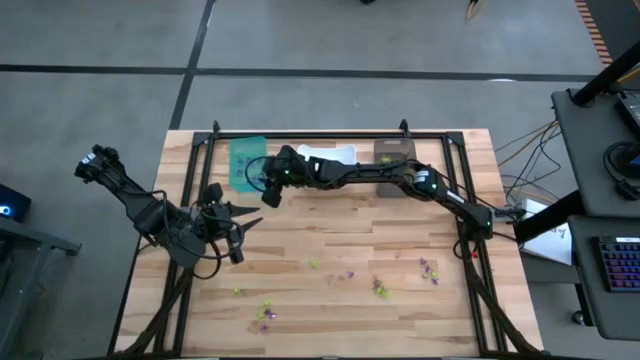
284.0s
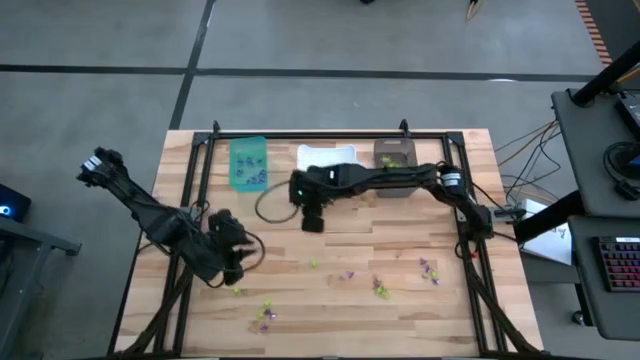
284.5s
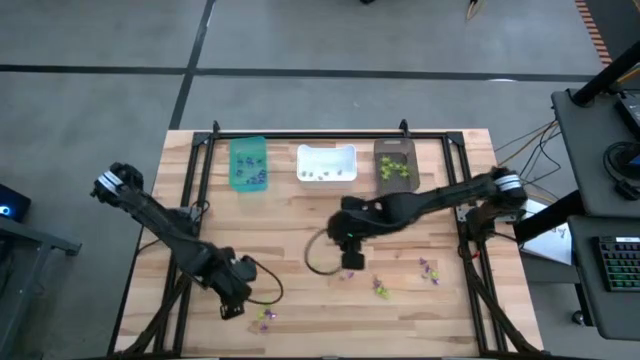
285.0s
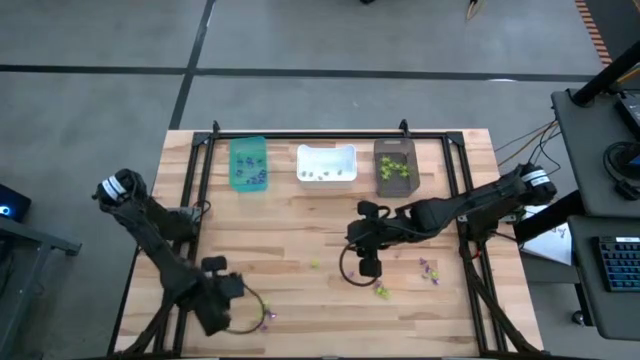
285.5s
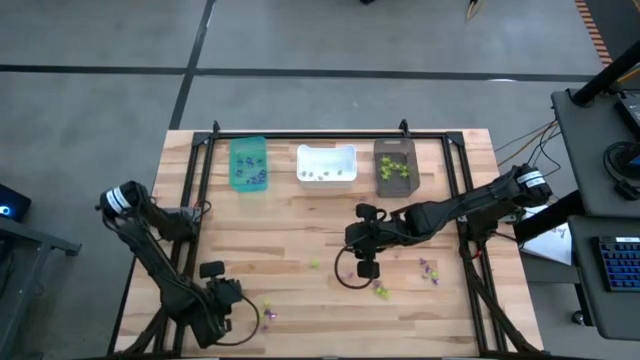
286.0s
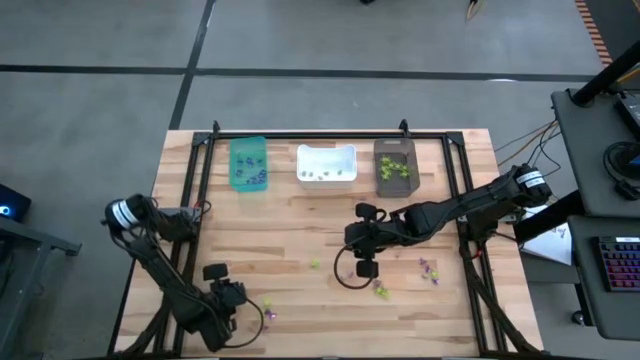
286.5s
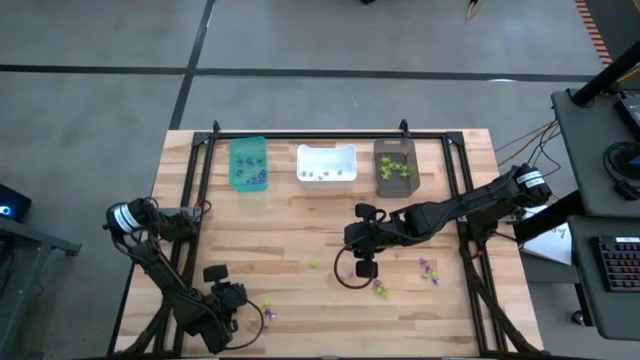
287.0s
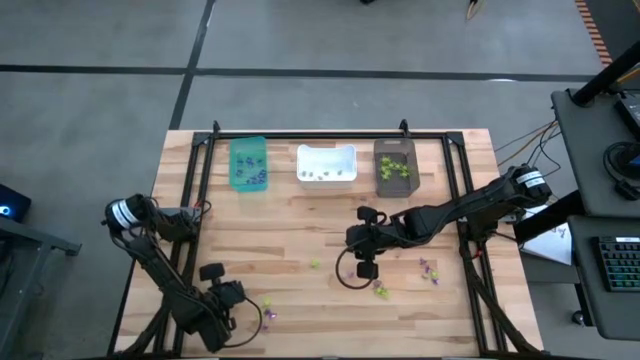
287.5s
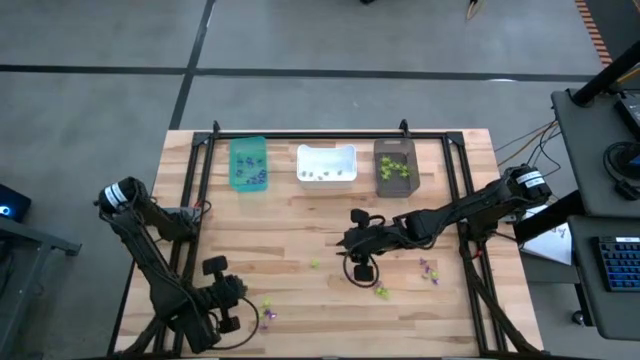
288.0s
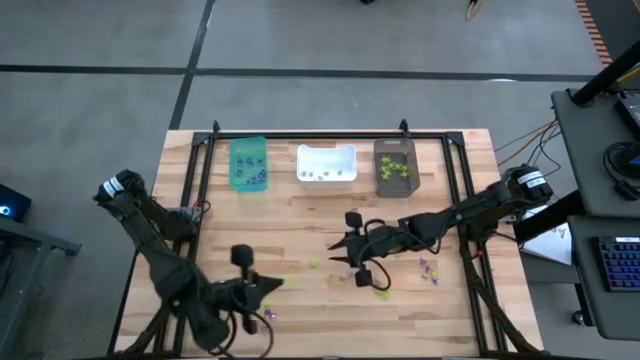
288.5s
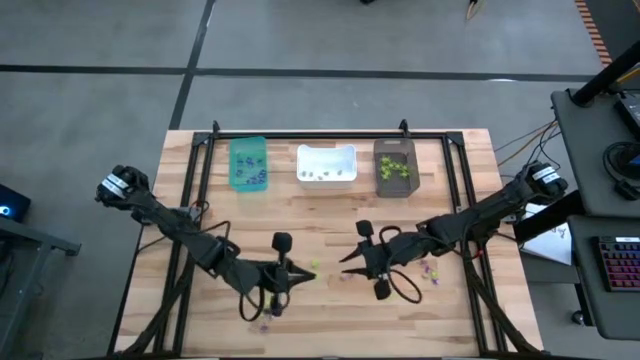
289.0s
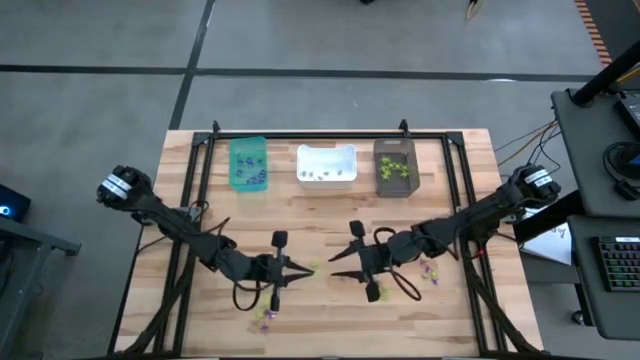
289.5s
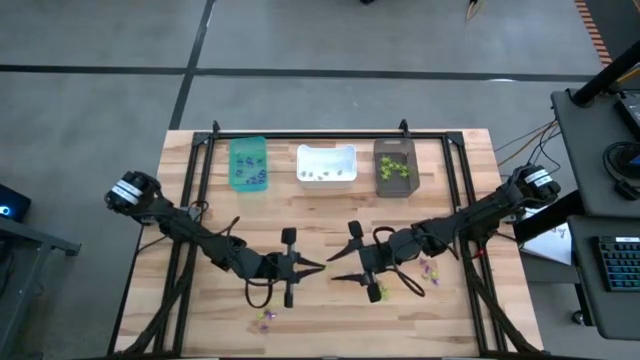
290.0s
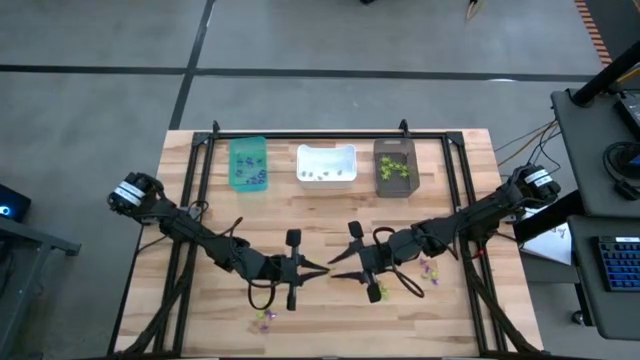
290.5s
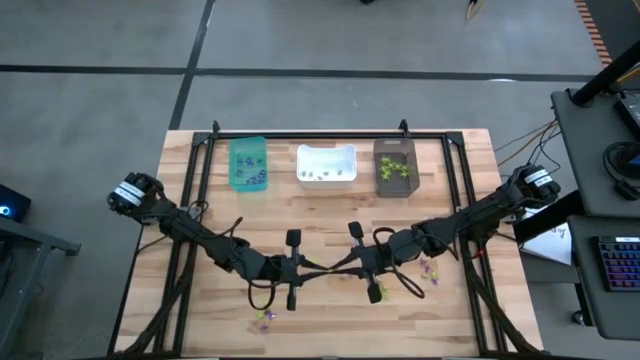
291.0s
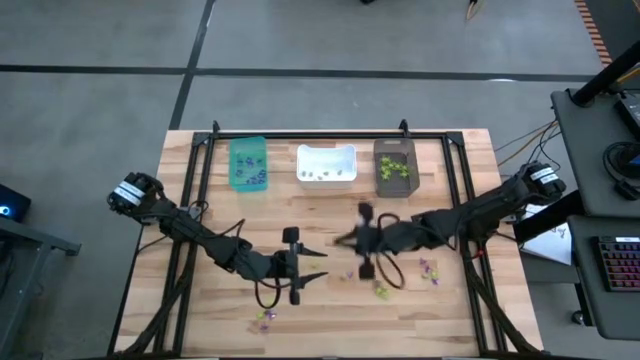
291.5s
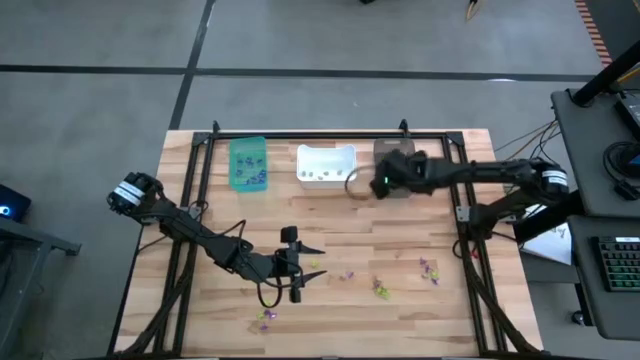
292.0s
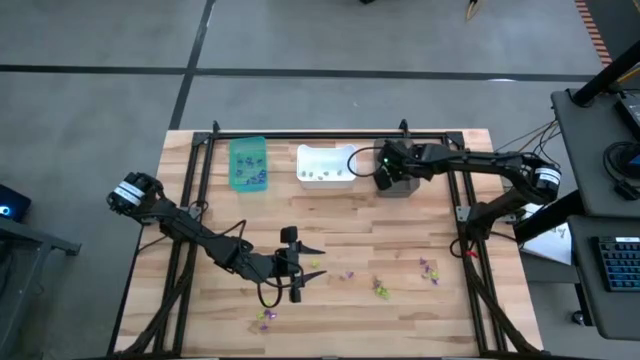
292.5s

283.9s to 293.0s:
Task: Sort Halloween decoration
Put the green spider toy into the black bin

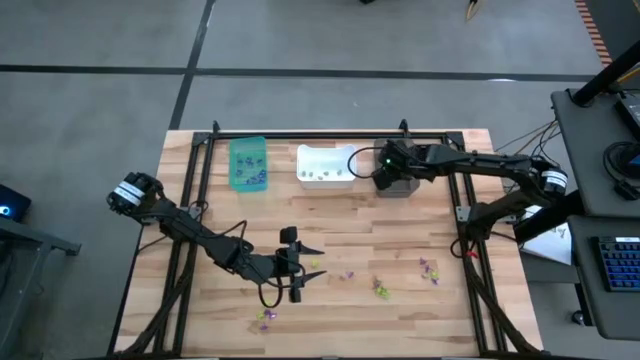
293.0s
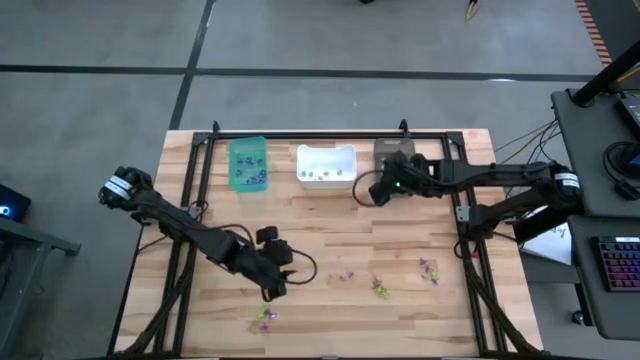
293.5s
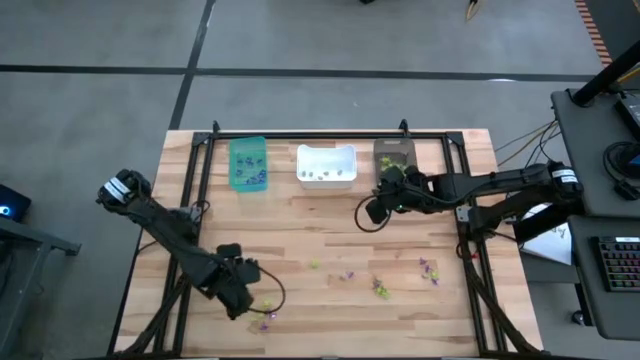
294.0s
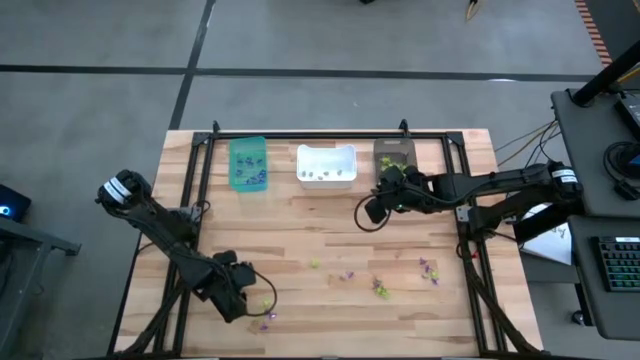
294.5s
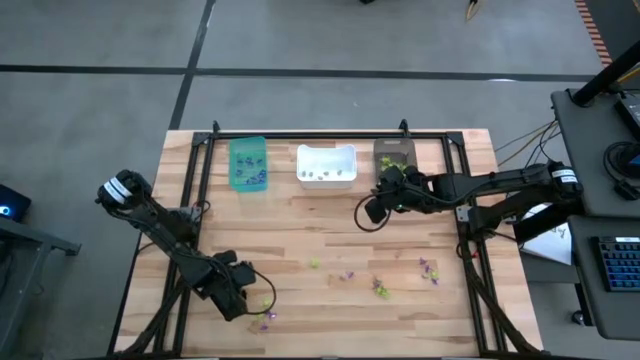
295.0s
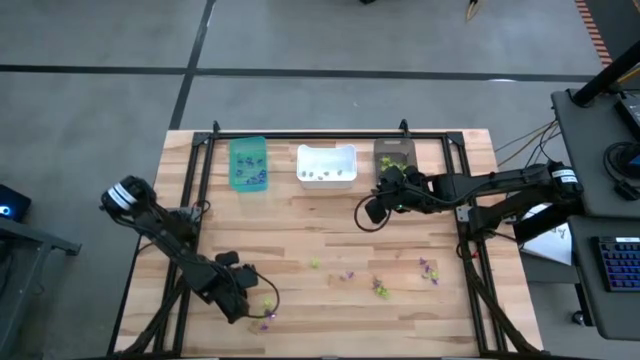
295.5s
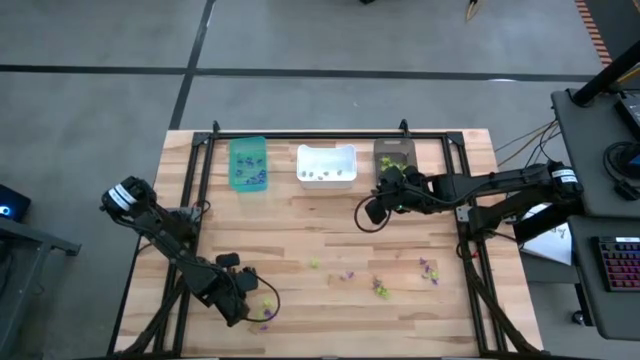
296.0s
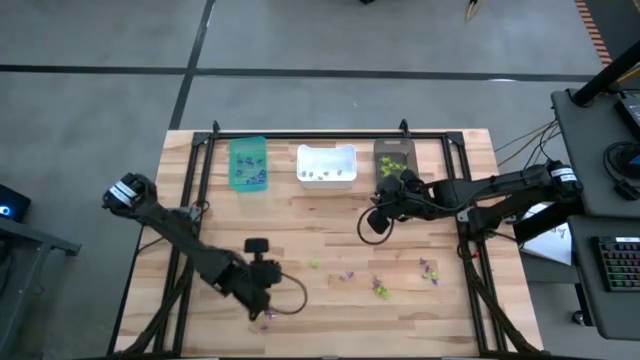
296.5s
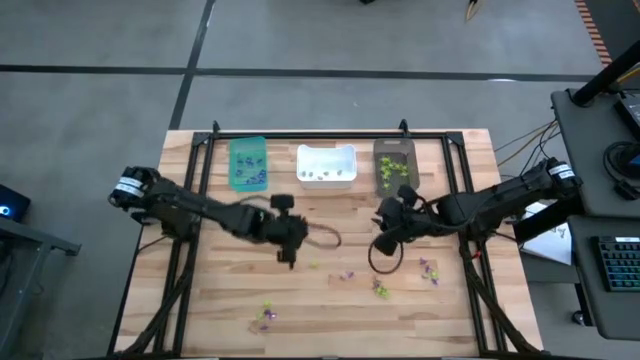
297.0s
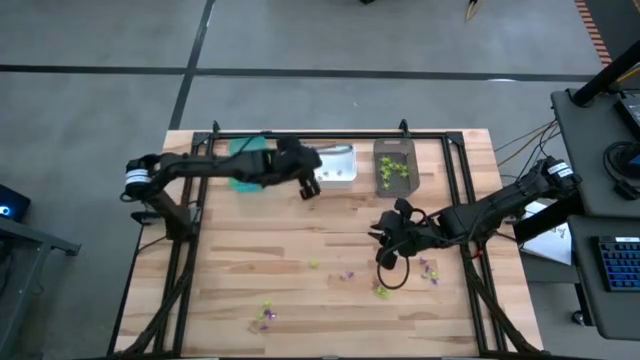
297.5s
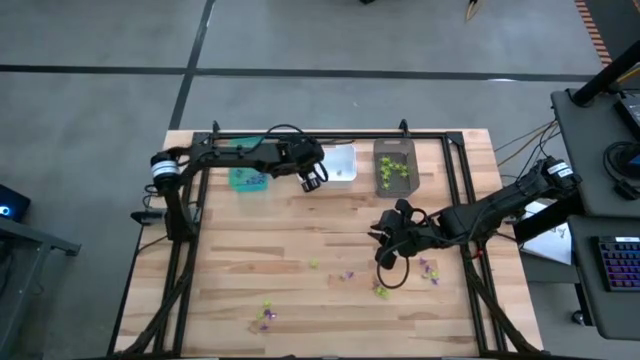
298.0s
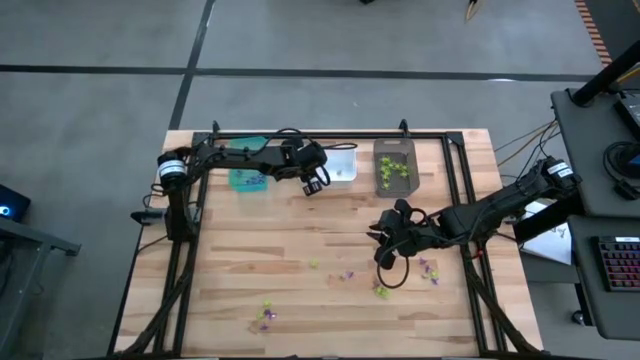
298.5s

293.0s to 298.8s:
Put the white skull toy into the white bin

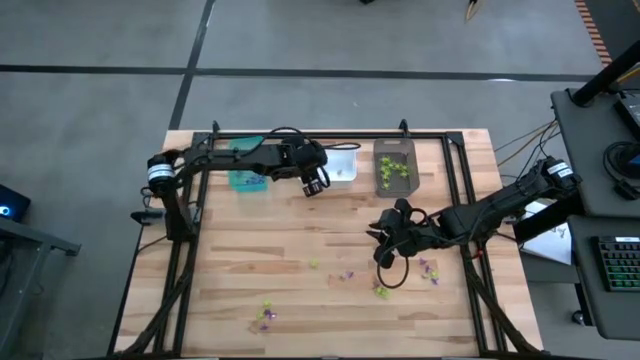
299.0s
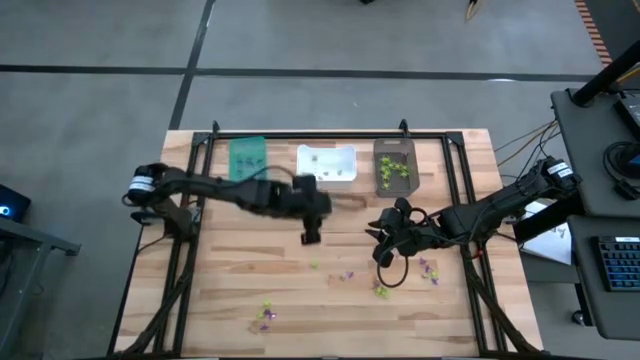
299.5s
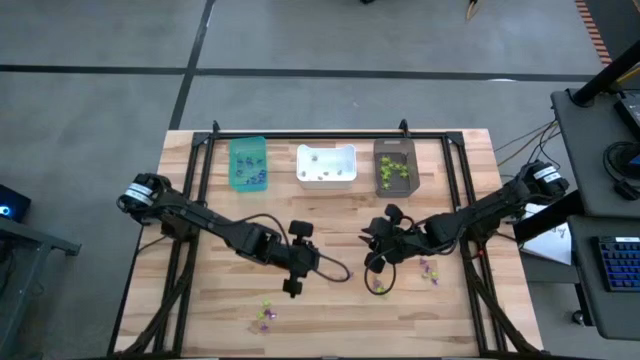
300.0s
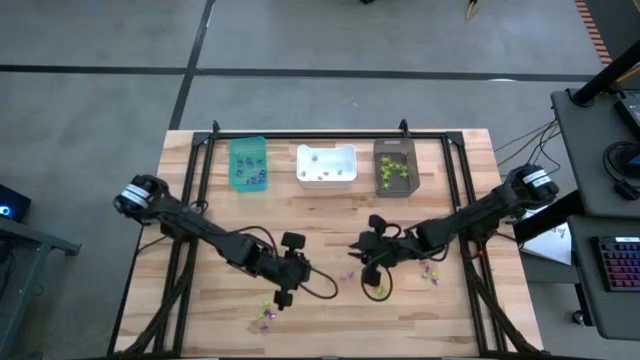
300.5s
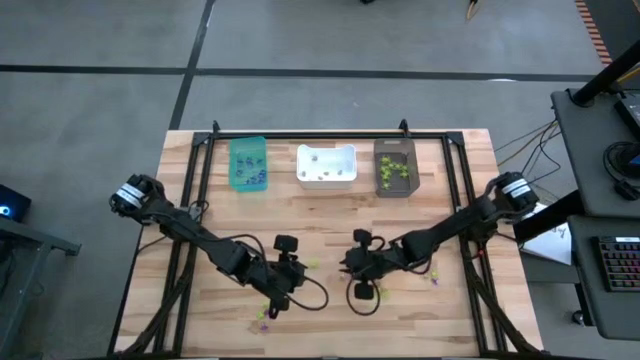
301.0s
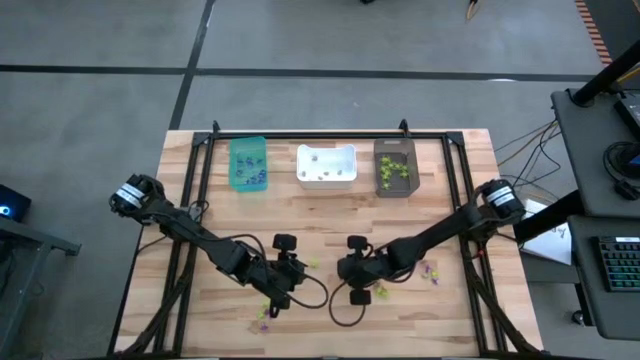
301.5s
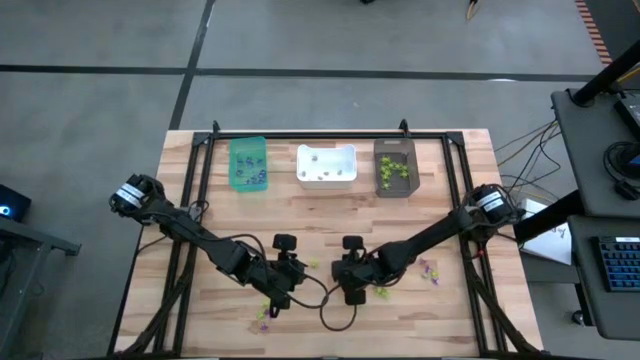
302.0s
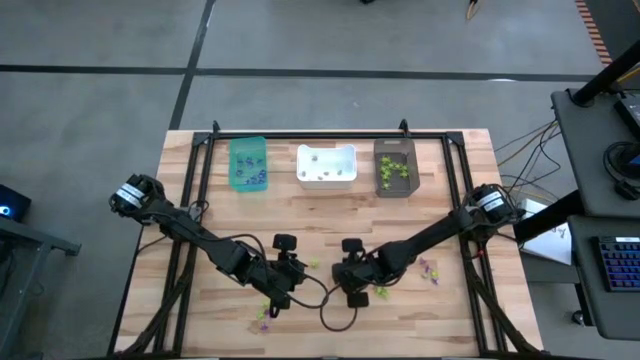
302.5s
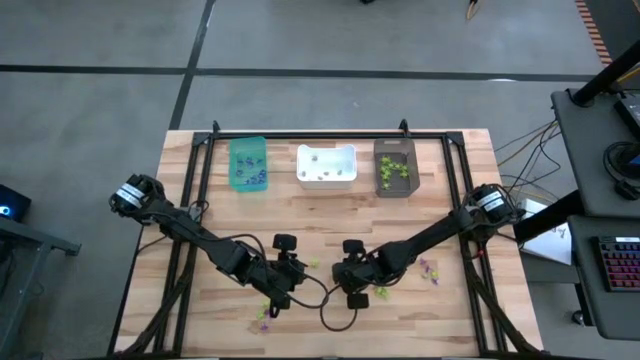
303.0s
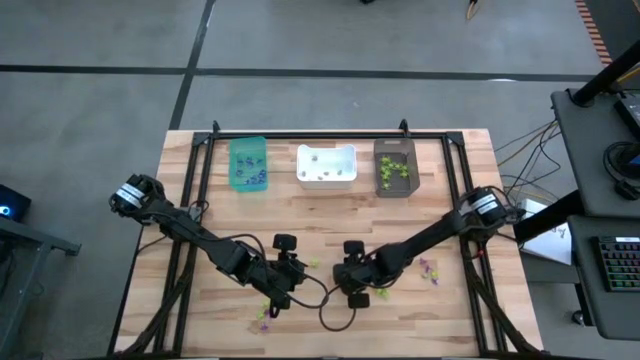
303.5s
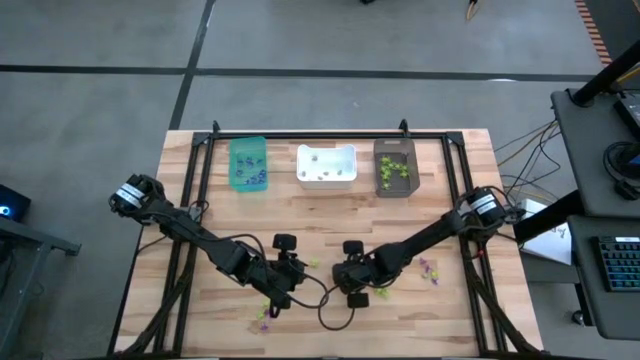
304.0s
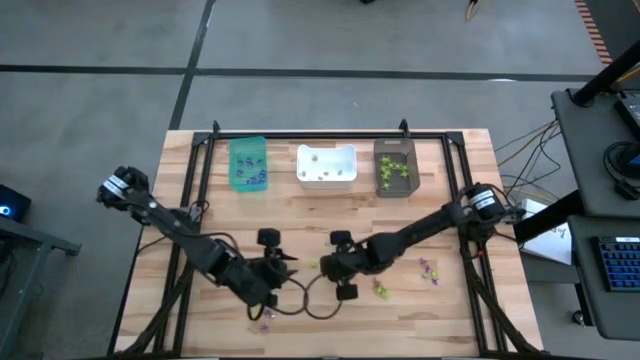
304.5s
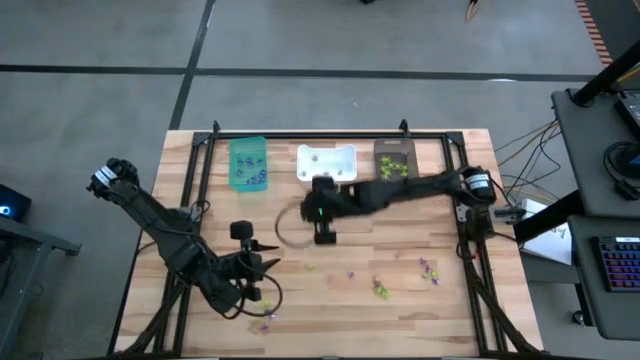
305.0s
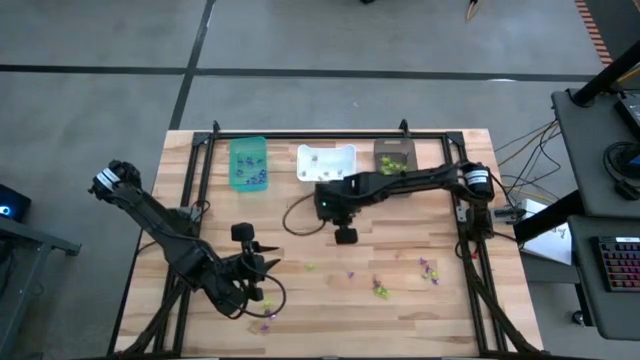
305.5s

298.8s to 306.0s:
Put the white skull toy into the white bin
